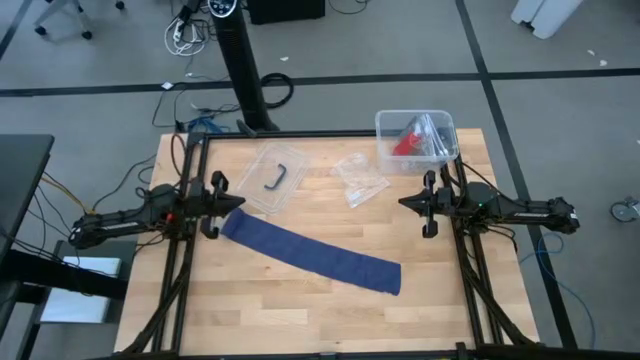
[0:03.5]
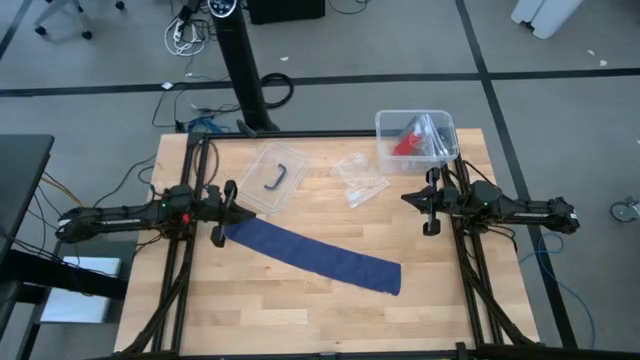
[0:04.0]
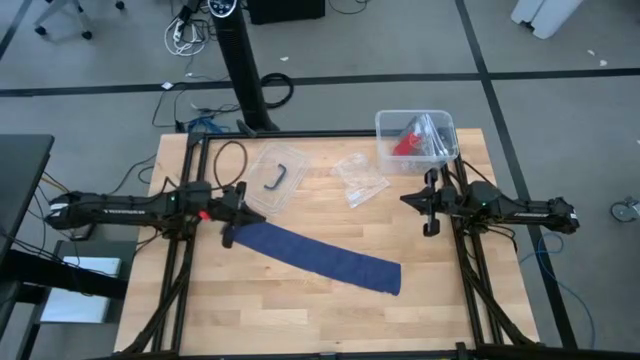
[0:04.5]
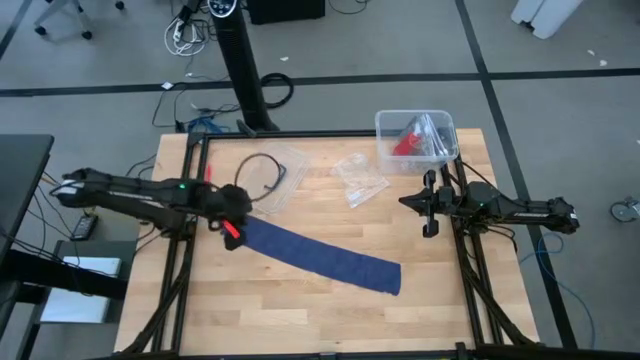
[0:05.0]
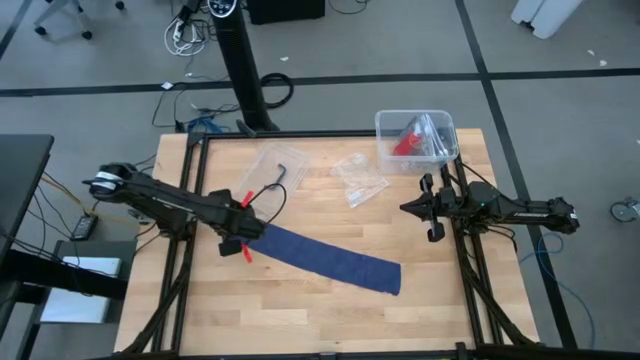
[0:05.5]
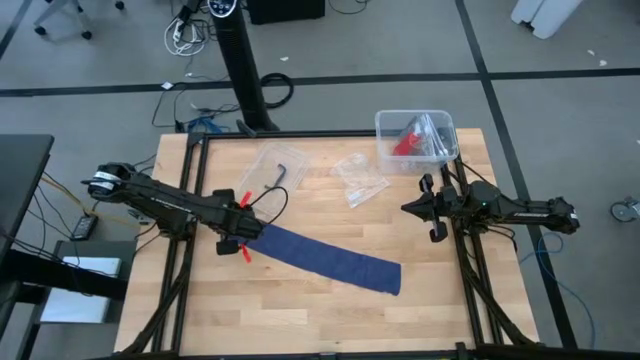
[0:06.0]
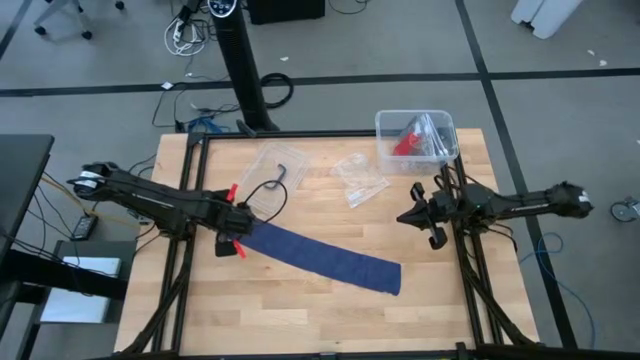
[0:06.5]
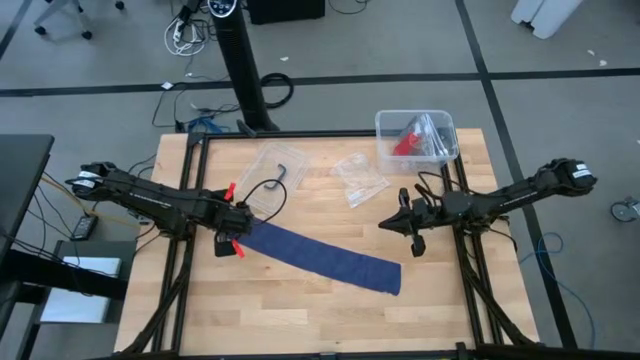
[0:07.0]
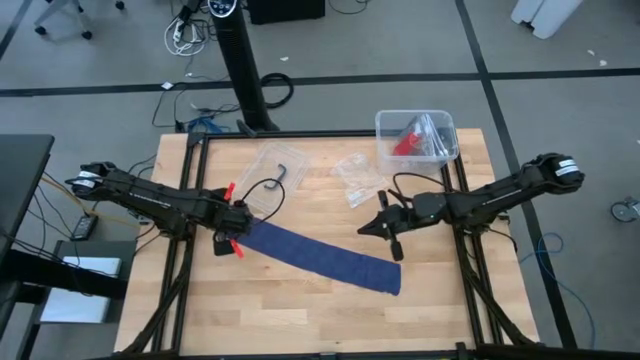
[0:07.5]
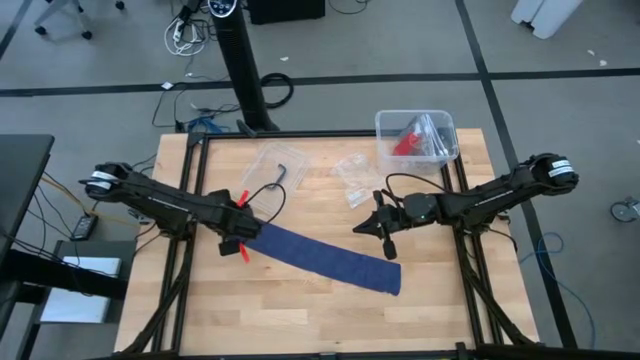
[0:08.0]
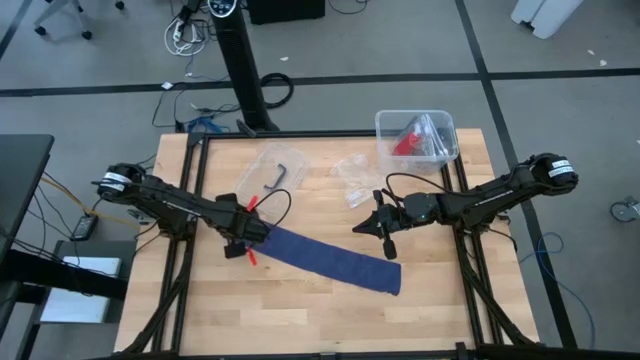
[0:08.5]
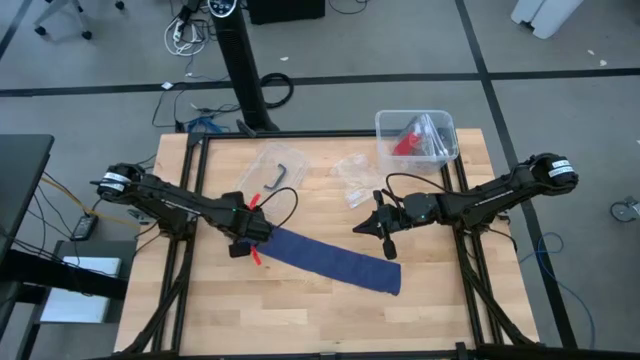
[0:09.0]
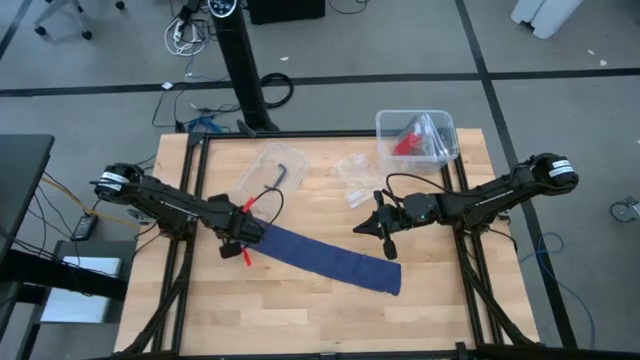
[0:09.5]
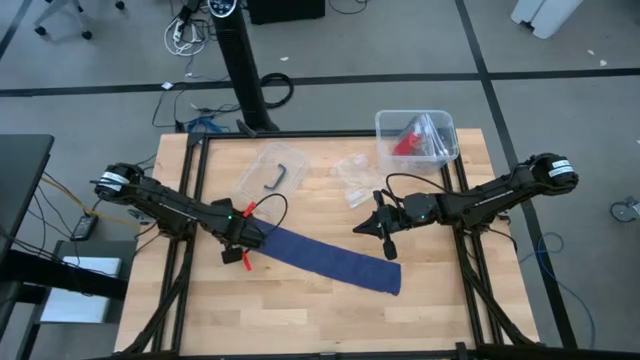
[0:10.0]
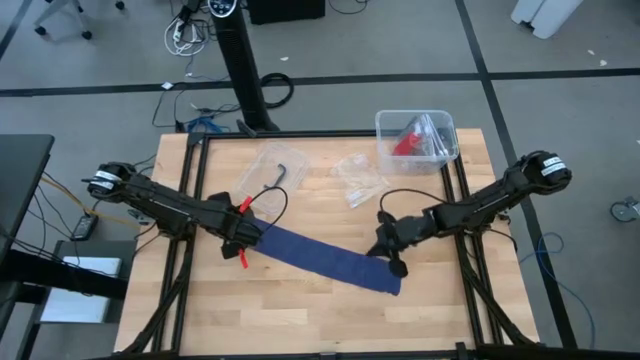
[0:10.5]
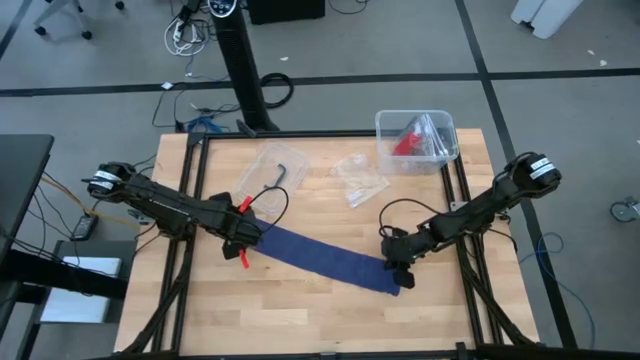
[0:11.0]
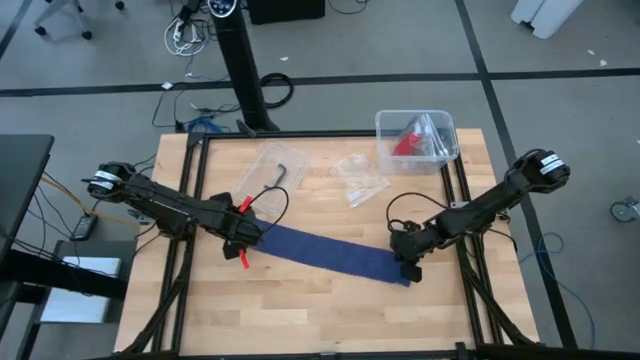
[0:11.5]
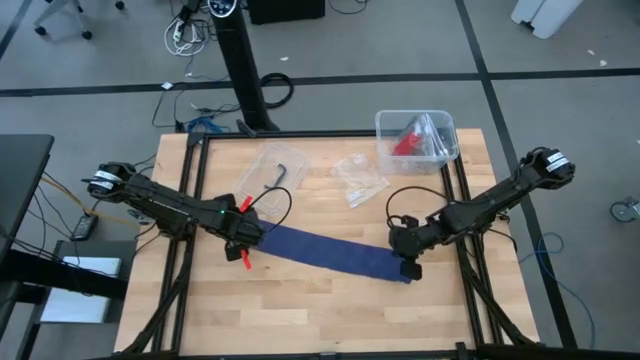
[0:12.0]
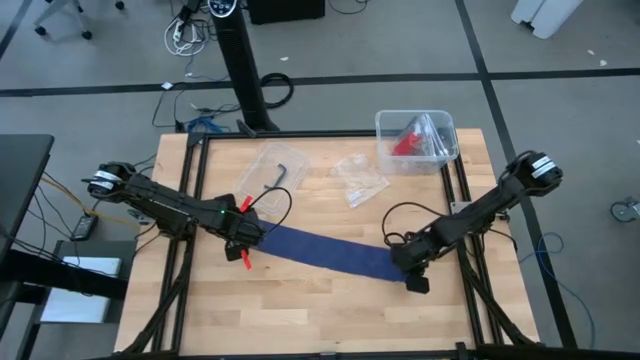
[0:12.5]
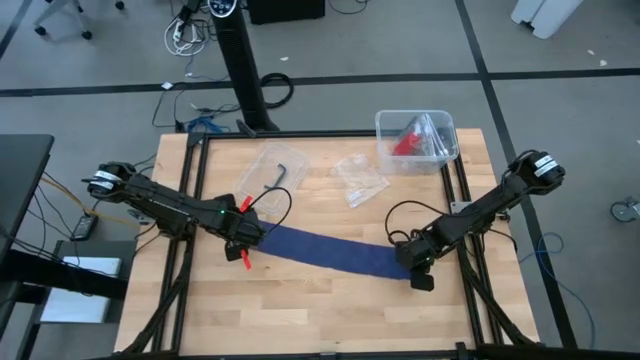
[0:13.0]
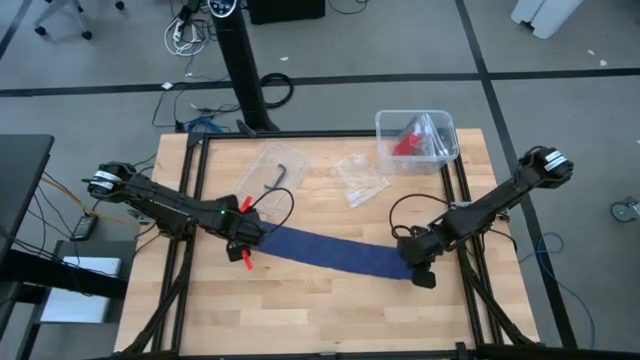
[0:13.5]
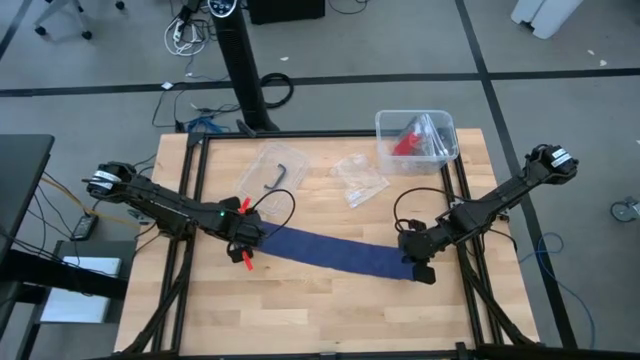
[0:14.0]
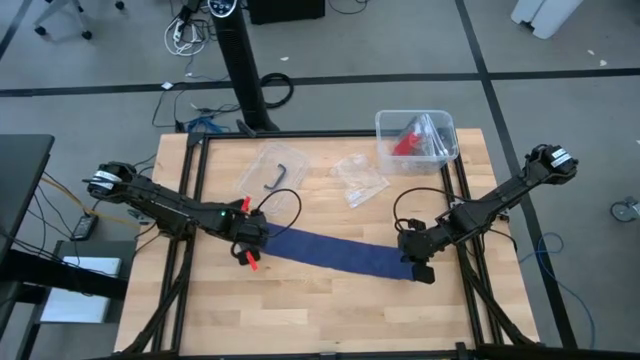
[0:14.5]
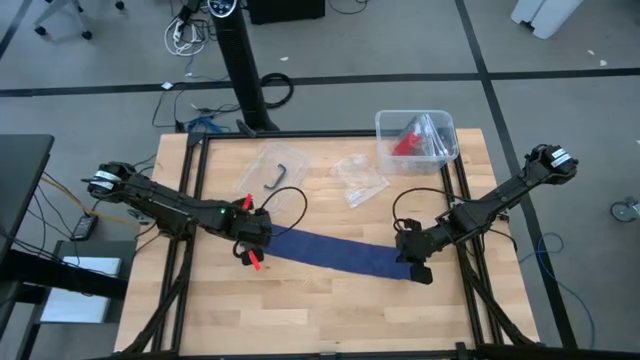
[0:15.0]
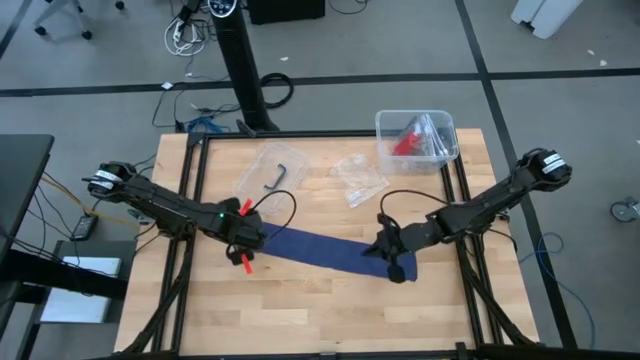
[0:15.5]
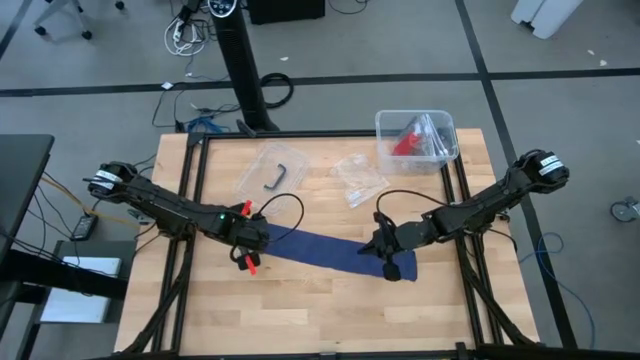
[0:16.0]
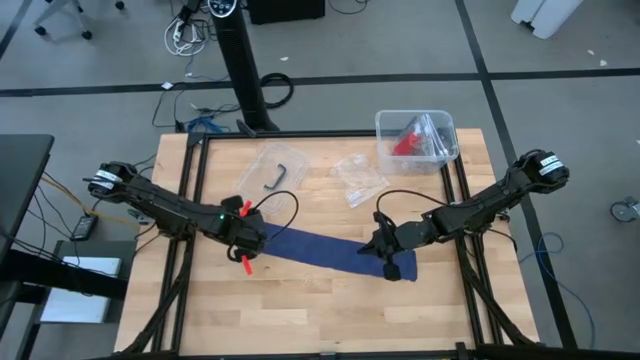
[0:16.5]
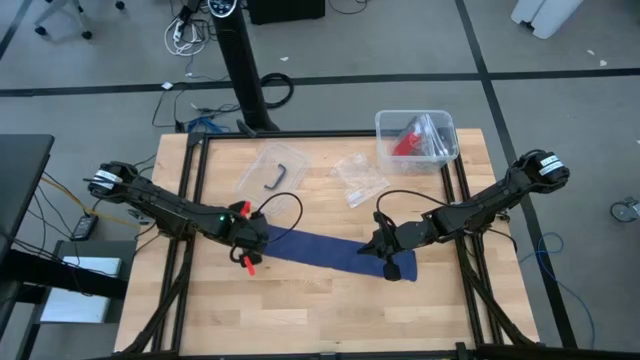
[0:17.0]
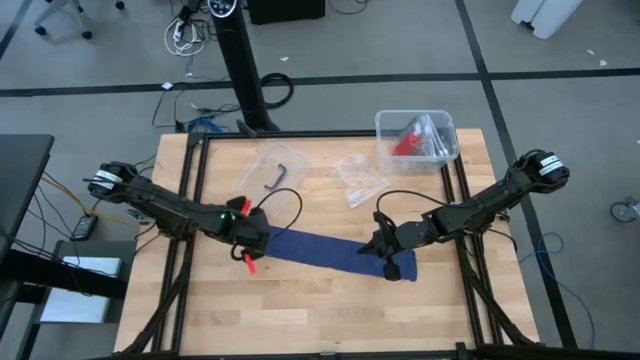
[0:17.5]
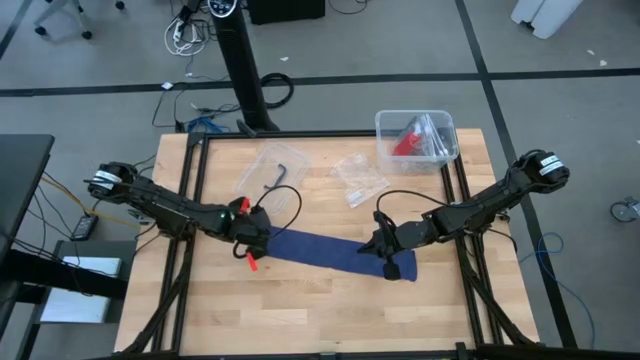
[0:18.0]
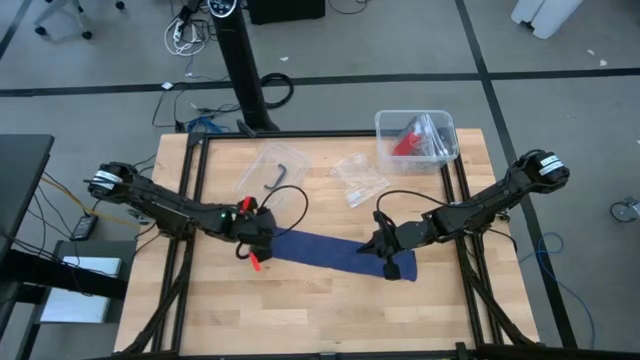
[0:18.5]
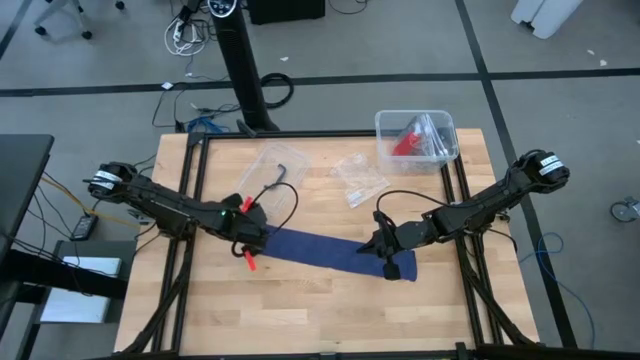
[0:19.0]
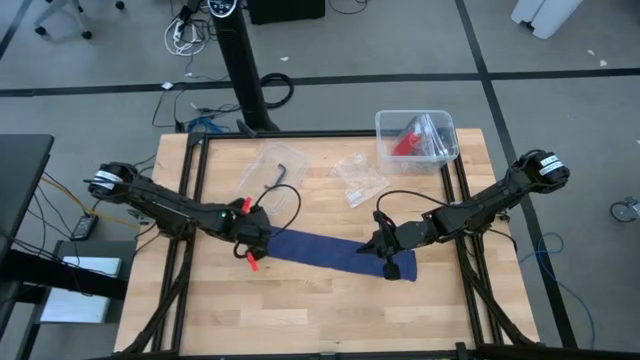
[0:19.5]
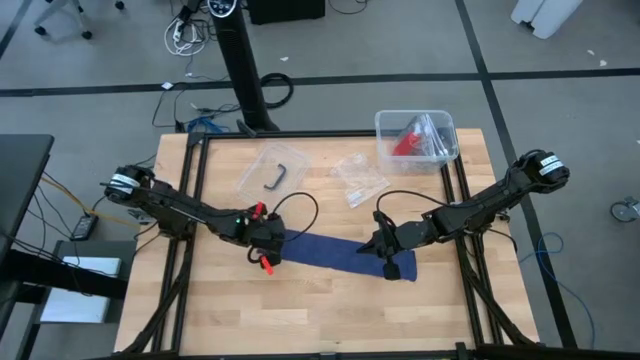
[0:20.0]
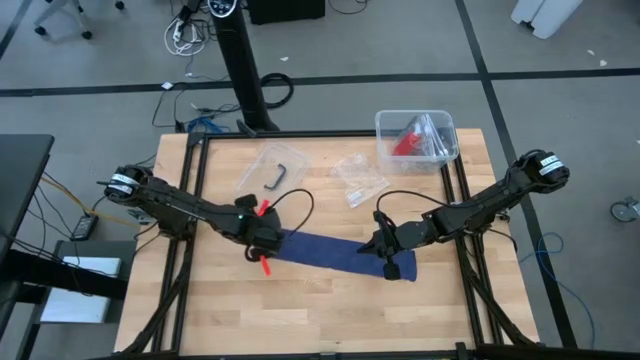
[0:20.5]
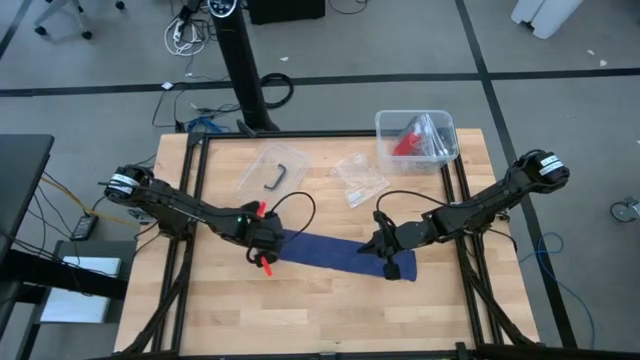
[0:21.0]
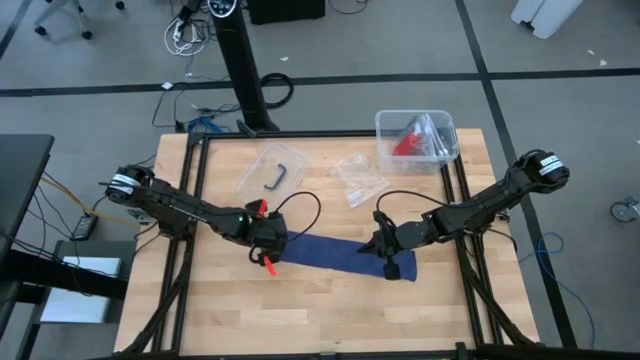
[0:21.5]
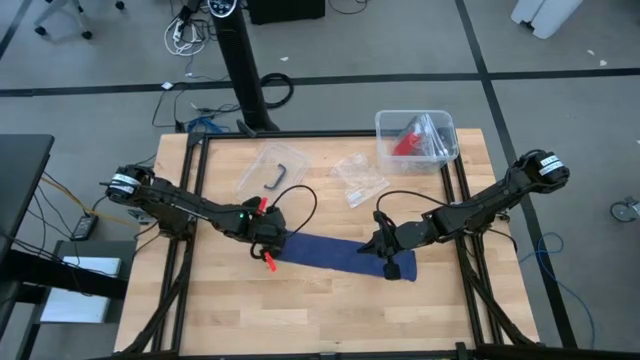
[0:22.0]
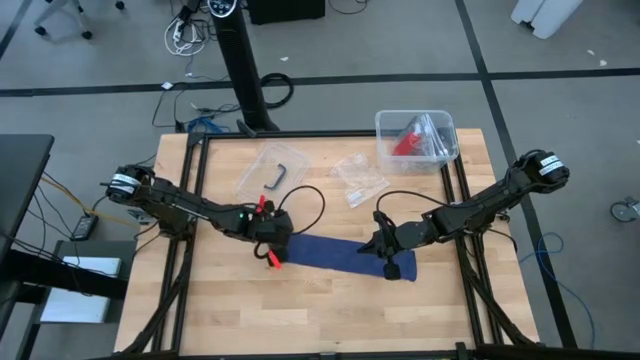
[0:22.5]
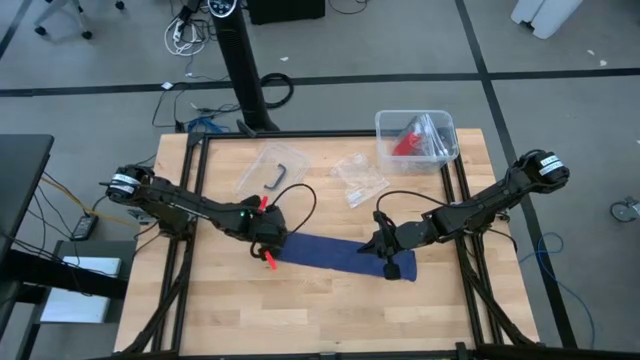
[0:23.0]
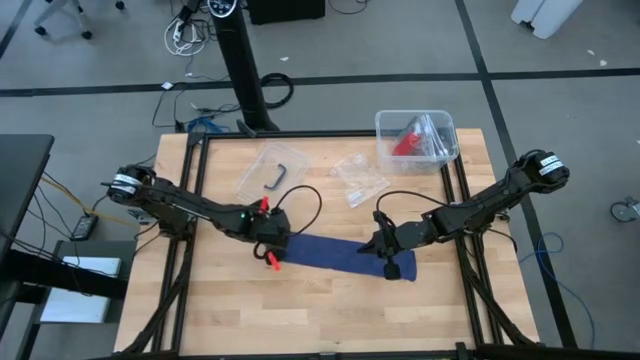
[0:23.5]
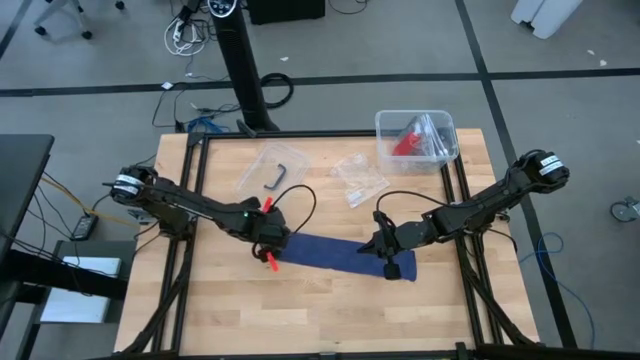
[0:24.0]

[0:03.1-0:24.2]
Task: Roll bandage
Roll the blue bandage
